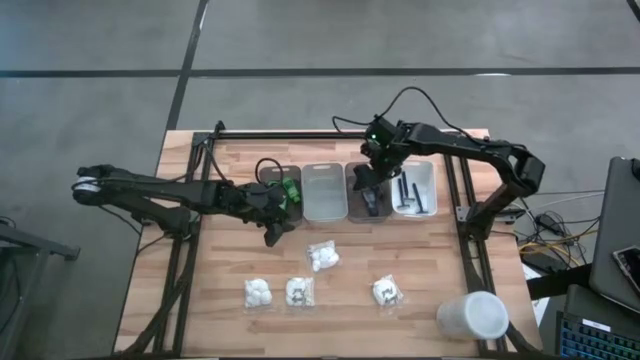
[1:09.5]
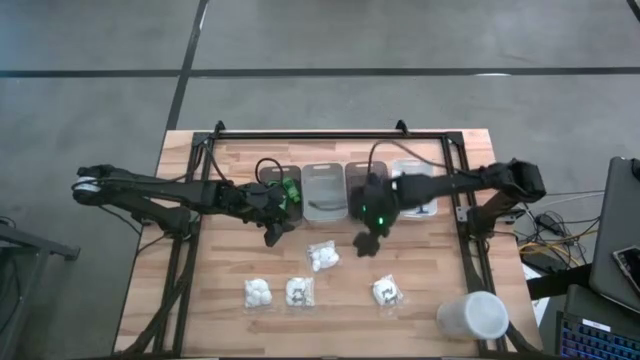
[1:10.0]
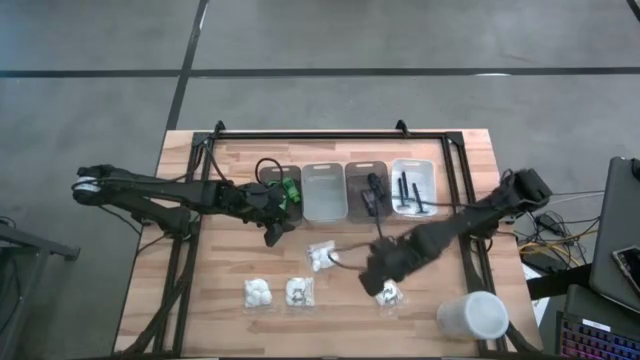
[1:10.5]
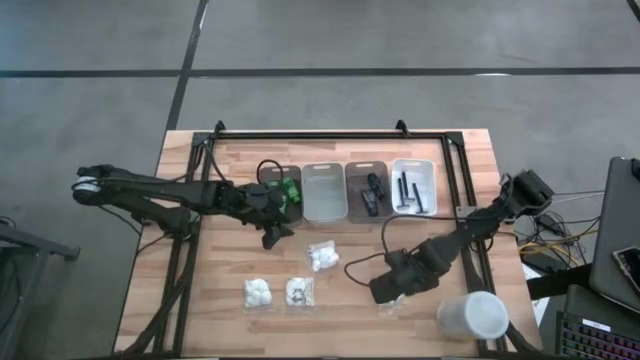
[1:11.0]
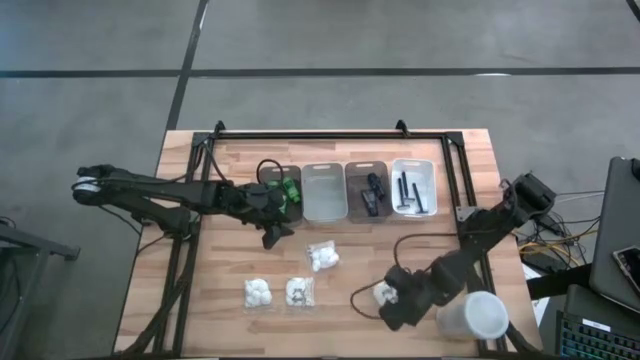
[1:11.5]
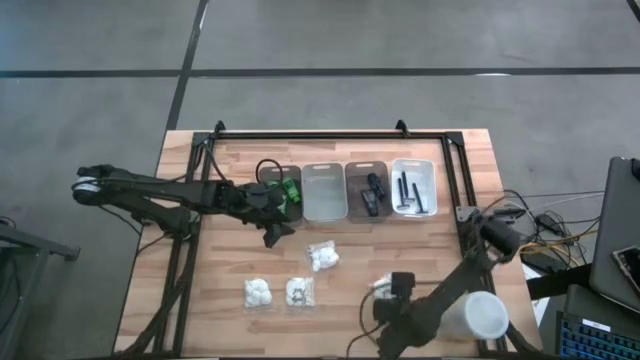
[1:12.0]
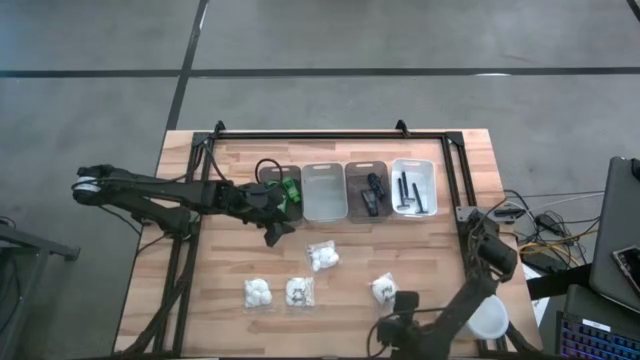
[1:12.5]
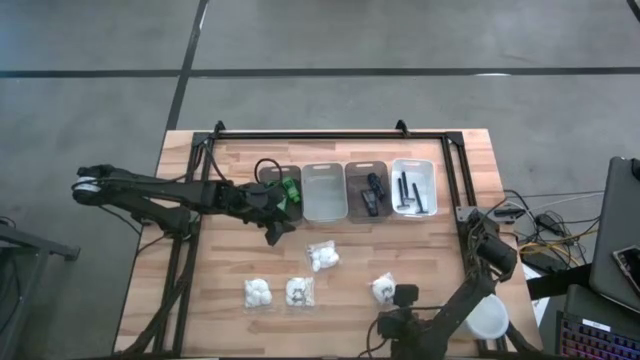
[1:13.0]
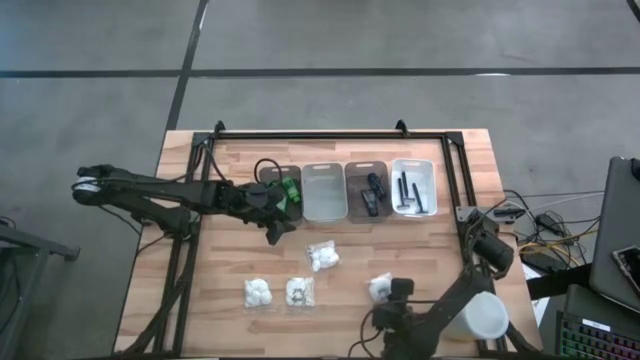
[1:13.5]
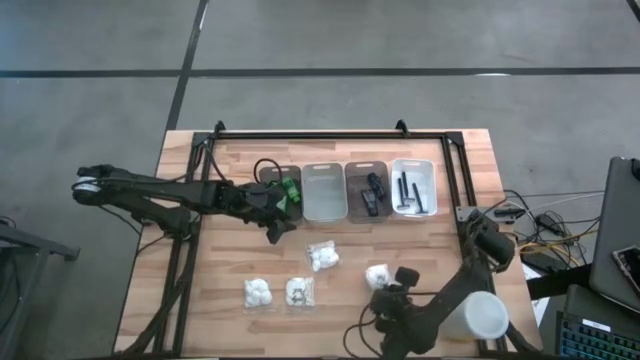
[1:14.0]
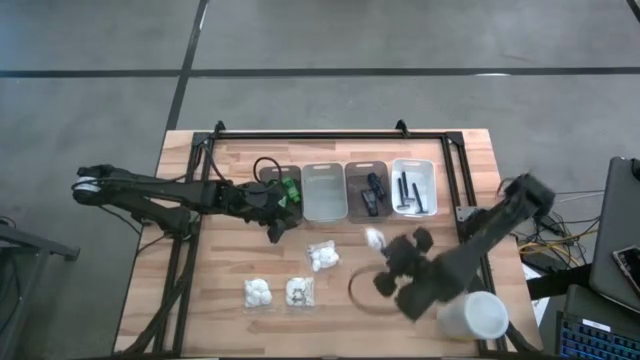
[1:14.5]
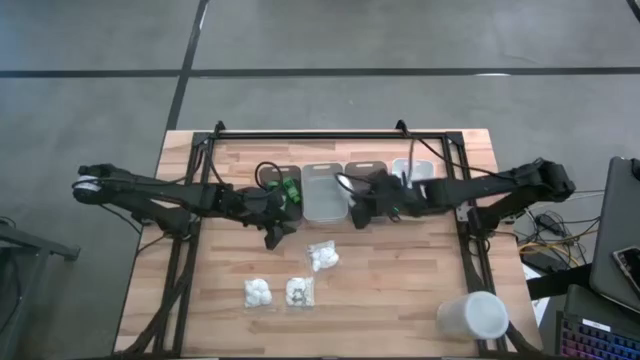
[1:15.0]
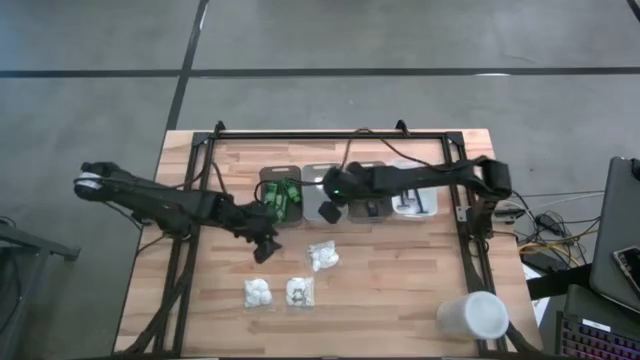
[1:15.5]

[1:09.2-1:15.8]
Task: Pick & Place Travel size toiletries
Put the cotton pack into the gray bin

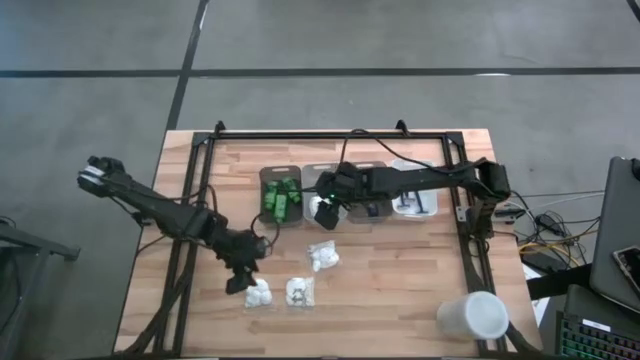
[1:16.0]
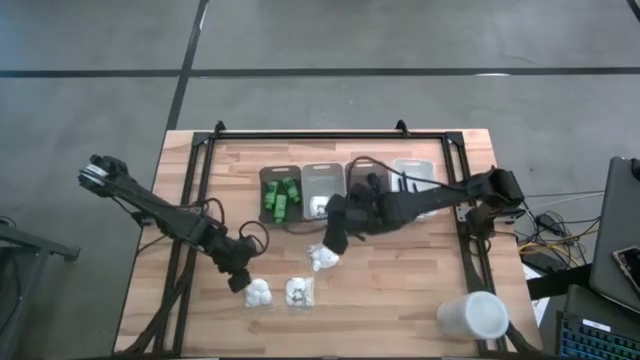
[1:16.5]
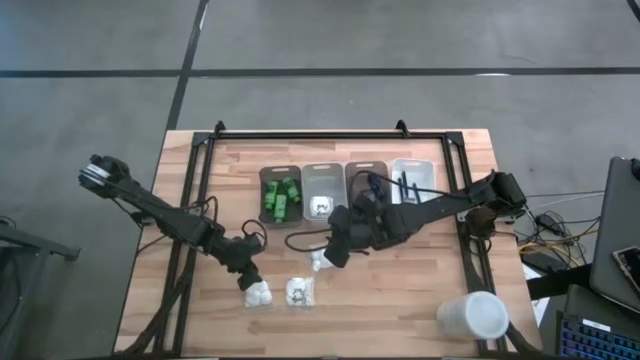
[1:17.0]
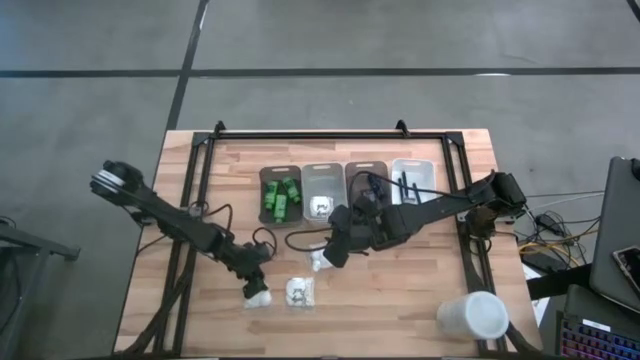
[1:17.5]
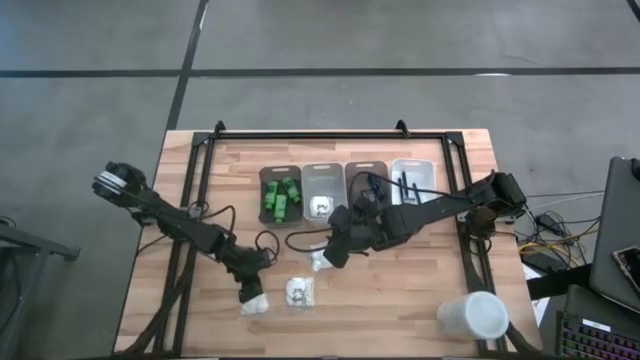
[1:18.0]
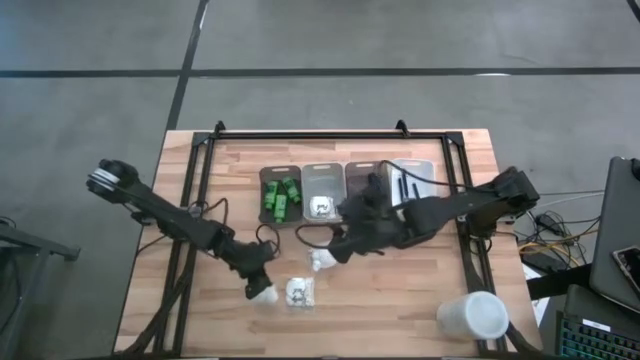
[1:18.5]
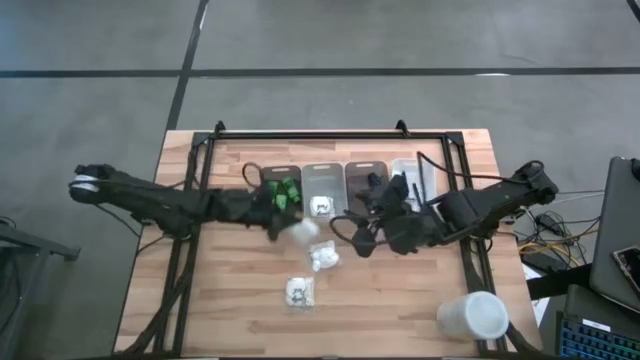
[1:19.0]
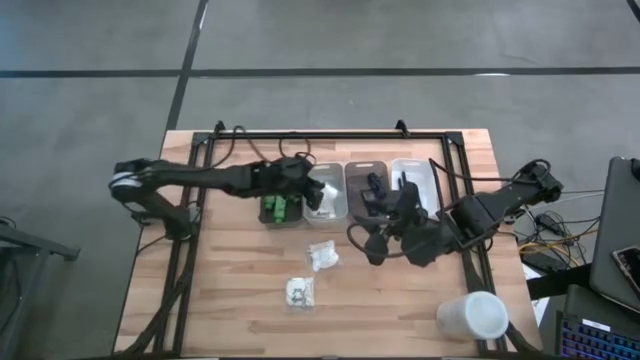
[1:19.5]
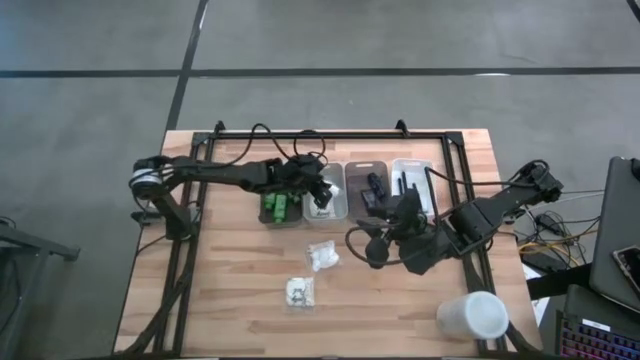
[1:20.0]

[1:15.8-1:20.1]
Put the cotton pack into the gray bin

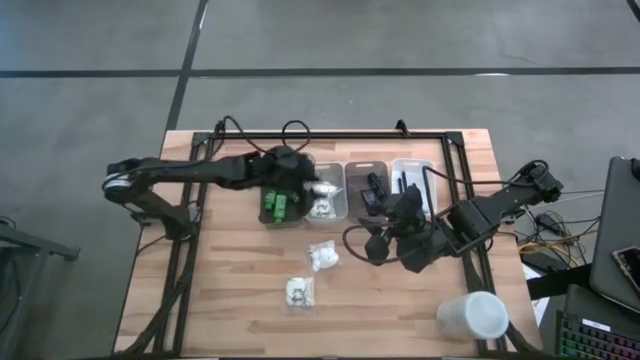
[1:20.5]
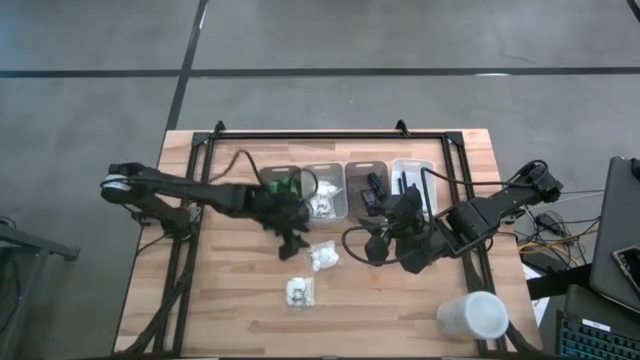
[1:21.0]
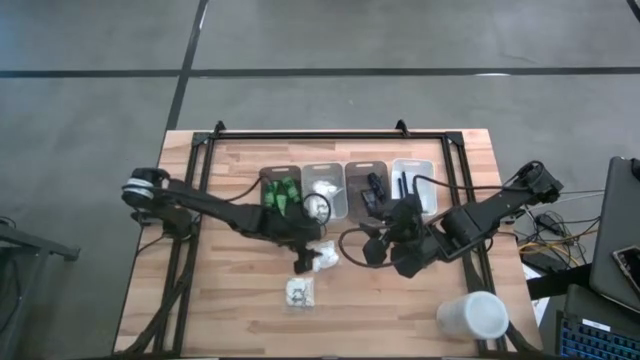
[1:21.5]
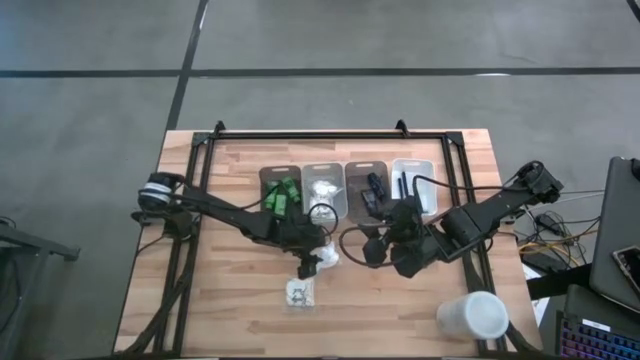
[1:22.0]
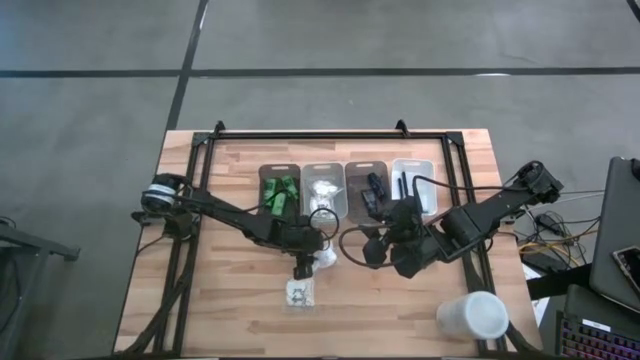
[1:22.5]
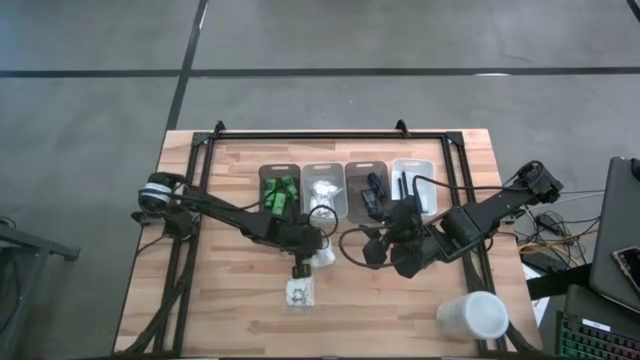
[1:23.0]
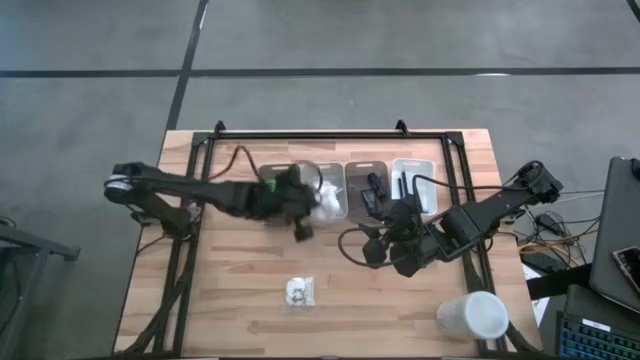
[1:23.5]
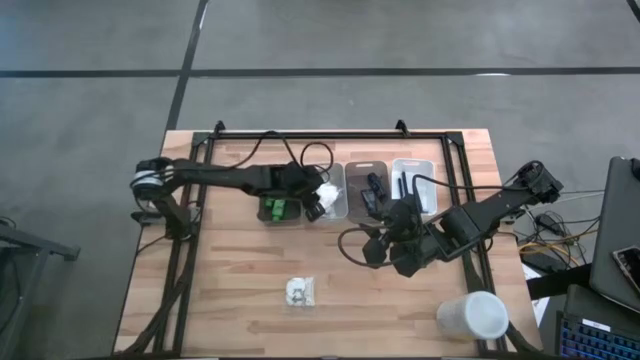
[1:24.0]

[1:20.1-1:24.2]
Put the cotton pack into the gray bin

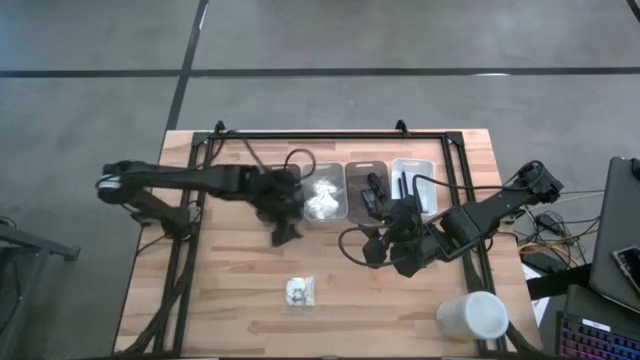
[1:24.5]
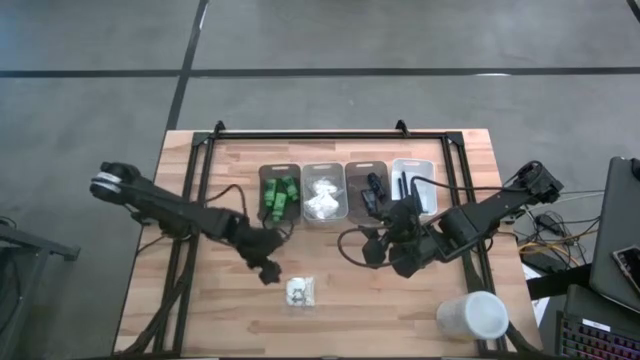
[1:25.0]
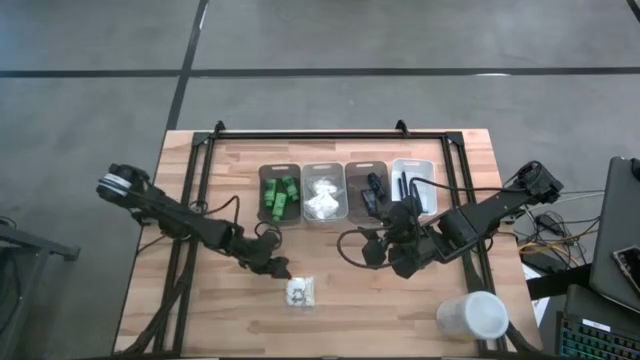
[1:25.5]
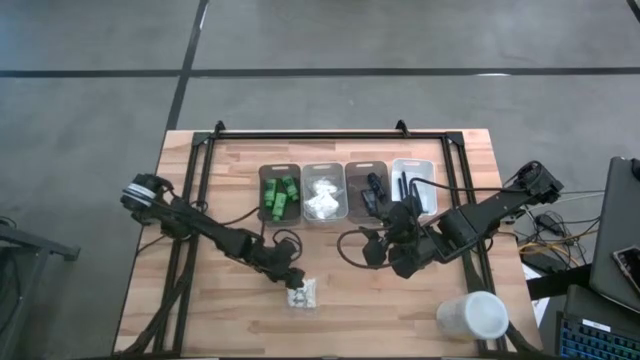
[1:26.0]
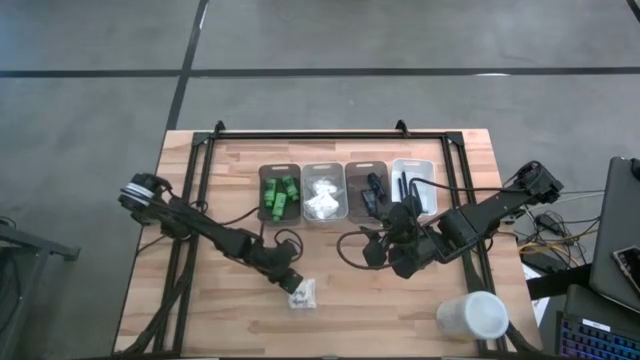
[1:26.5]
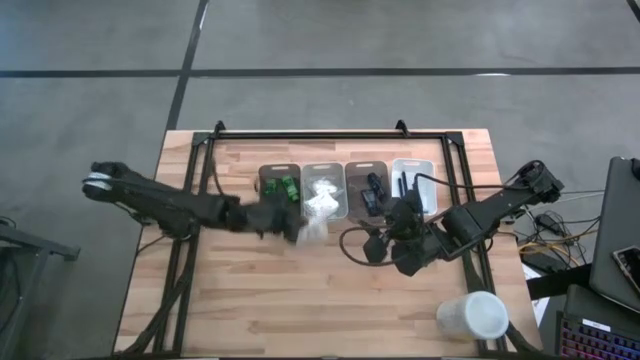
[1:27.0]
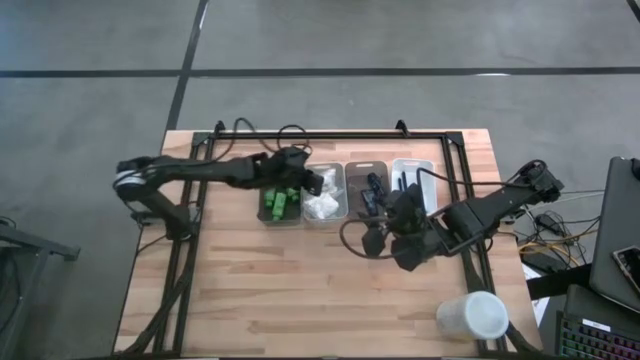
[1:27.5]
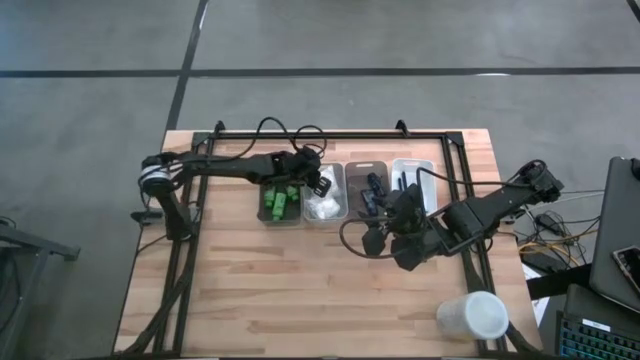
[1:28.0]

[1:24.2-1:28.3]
Put the cotton pack into the gray bin

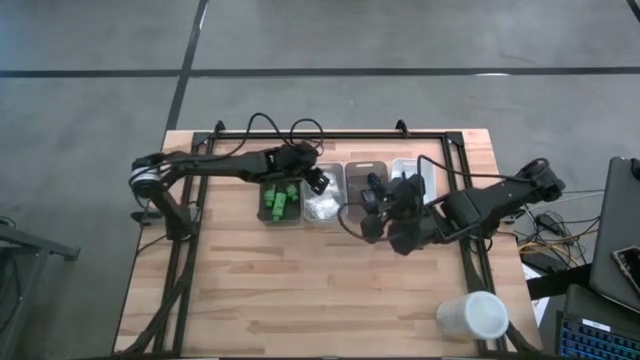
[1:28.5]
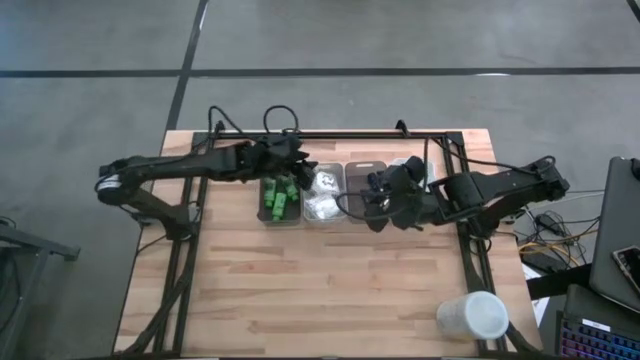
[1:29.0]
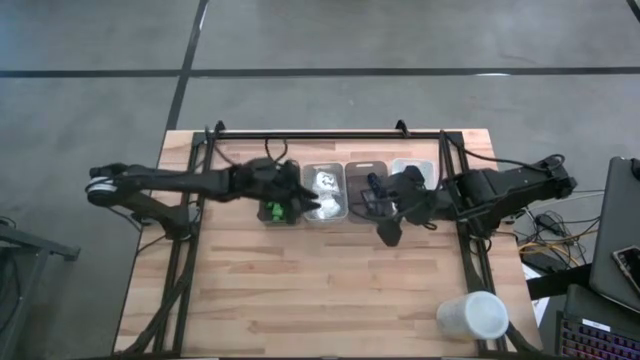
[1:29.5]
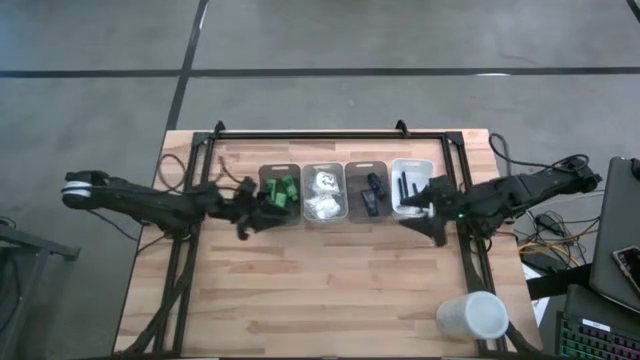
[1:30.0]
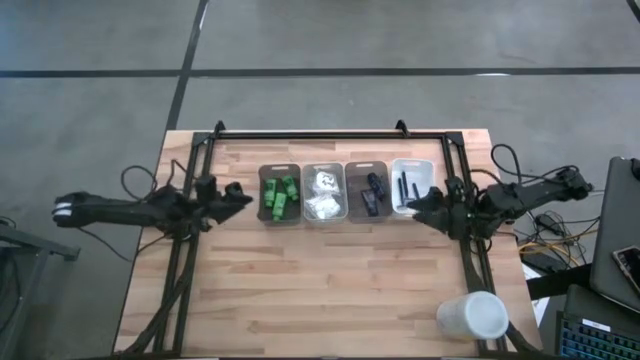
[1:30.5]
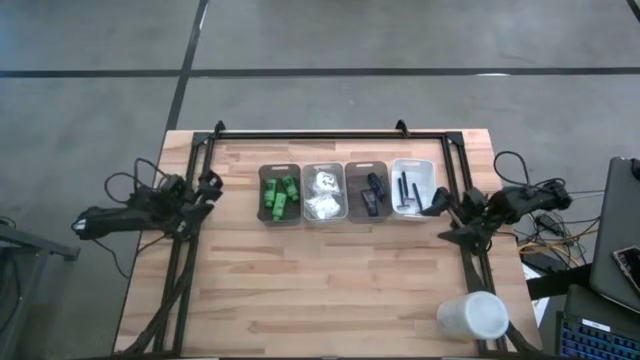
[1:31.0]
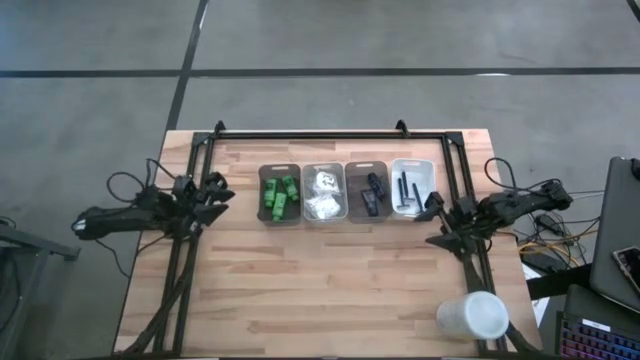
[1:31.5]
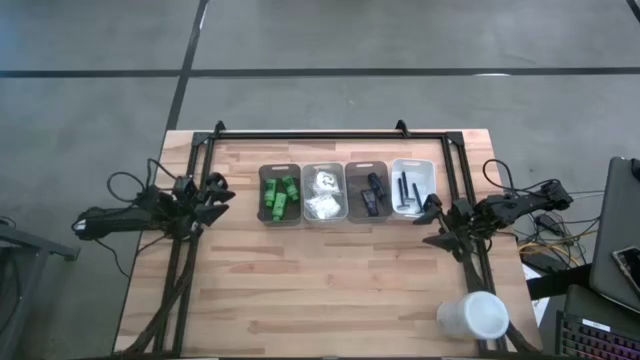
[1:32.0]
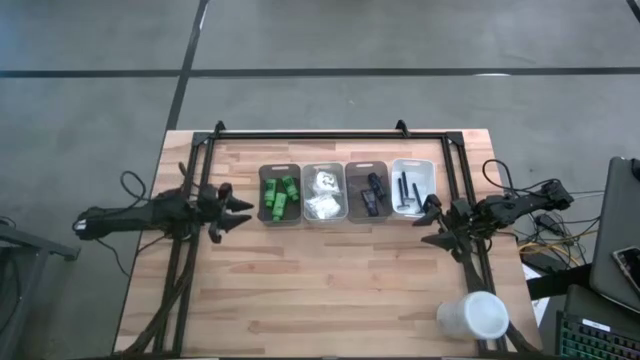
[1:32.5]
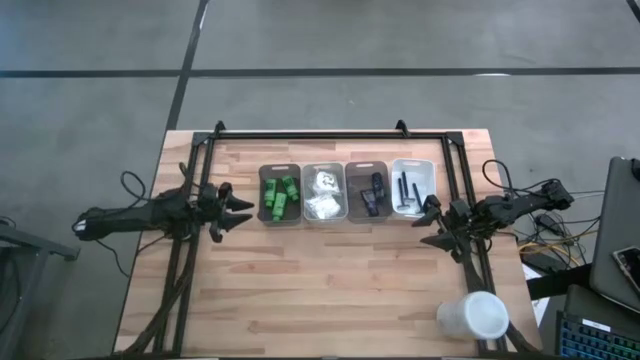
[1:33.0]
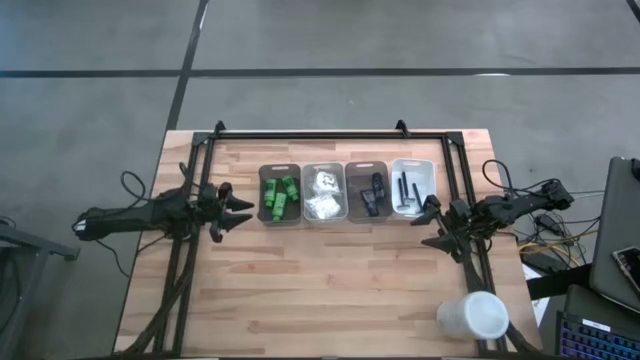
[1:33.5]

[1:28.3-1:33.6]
Return to Home Position
